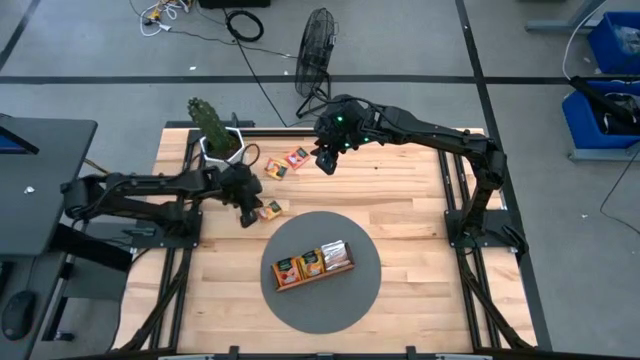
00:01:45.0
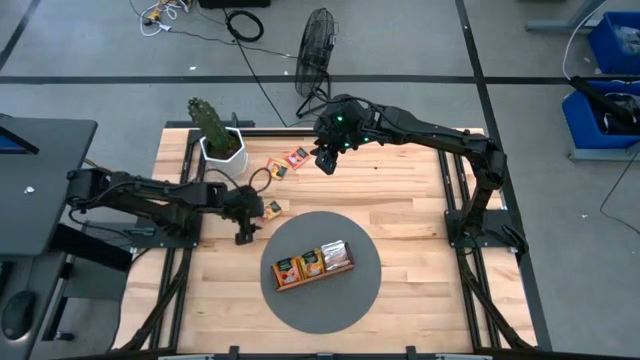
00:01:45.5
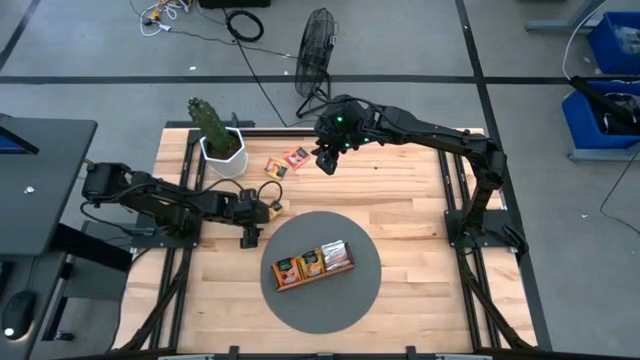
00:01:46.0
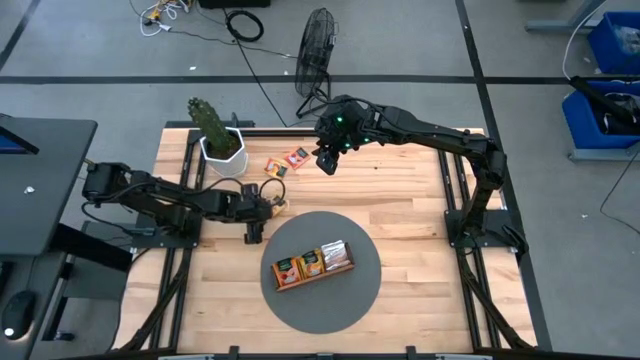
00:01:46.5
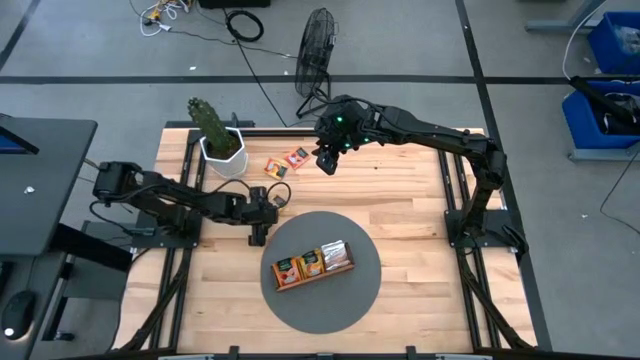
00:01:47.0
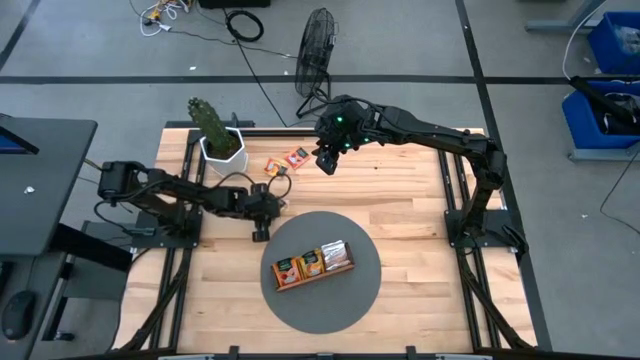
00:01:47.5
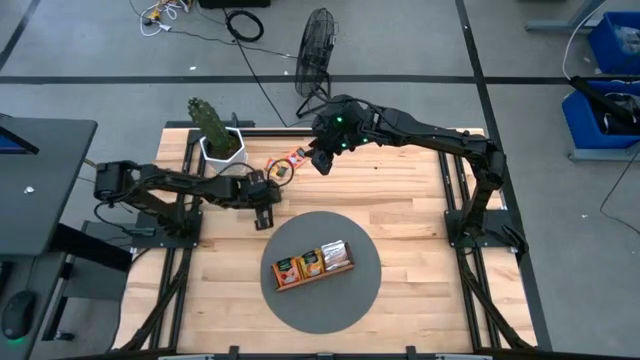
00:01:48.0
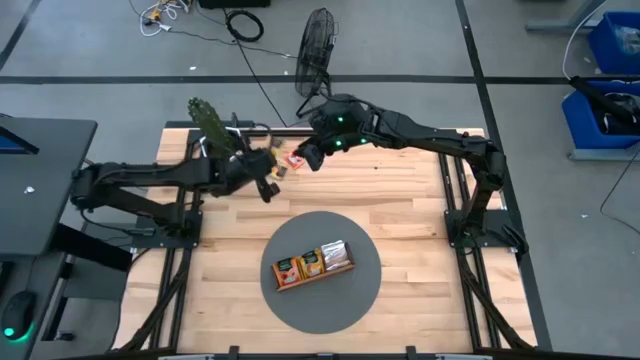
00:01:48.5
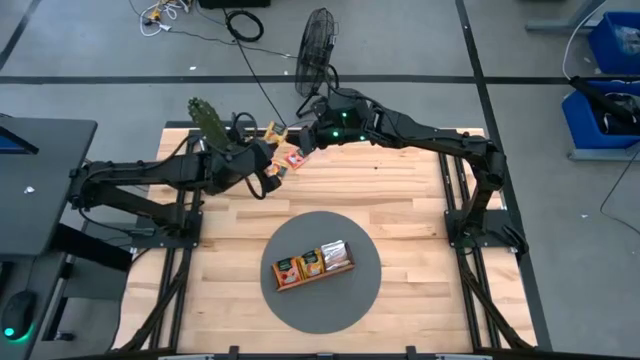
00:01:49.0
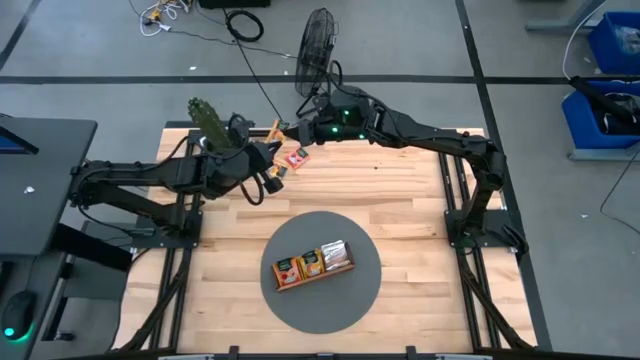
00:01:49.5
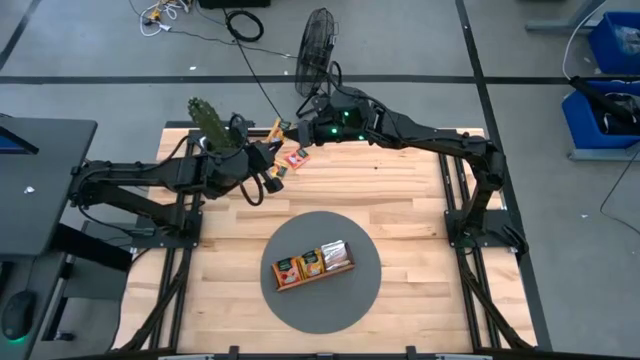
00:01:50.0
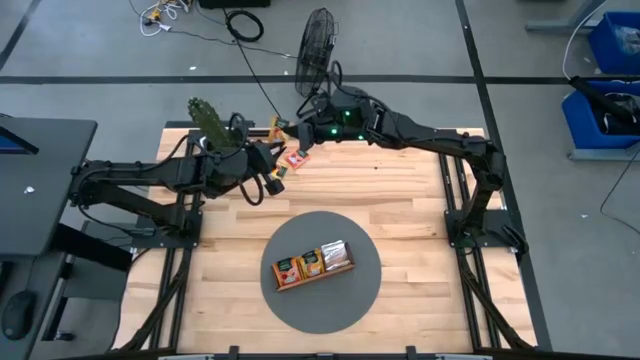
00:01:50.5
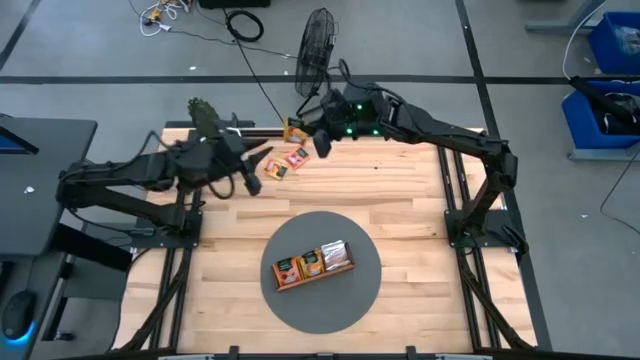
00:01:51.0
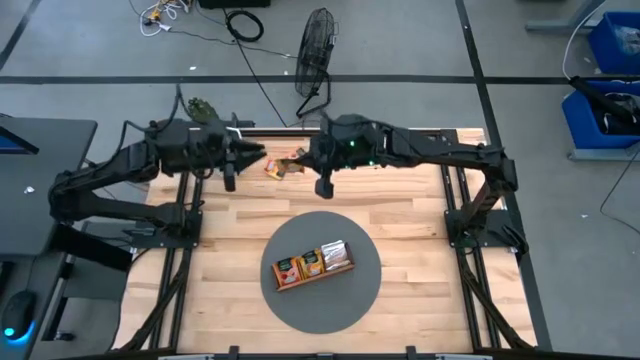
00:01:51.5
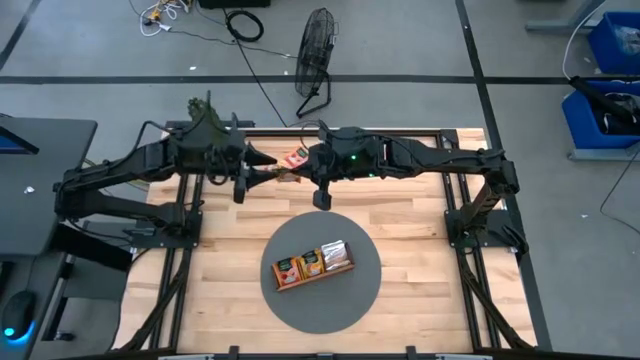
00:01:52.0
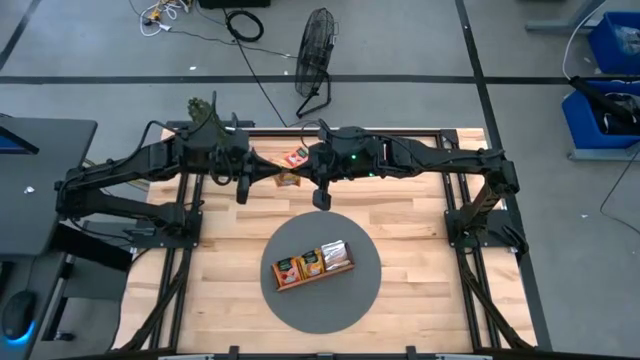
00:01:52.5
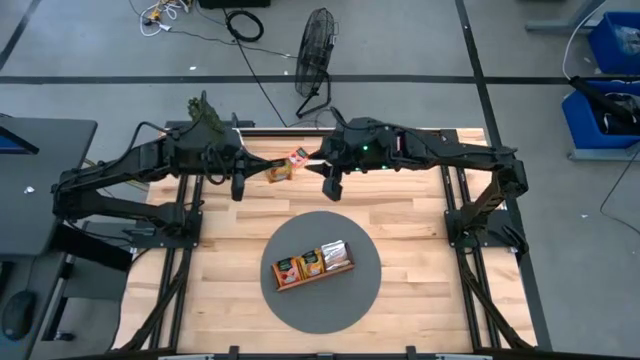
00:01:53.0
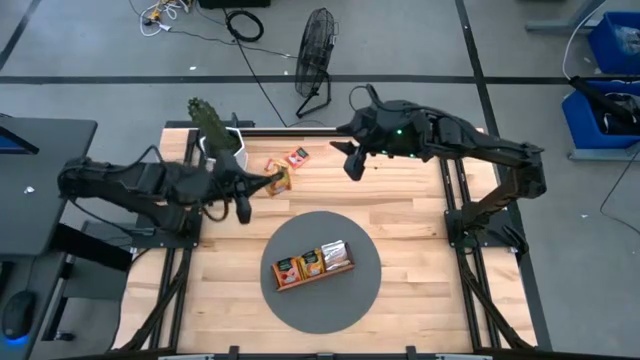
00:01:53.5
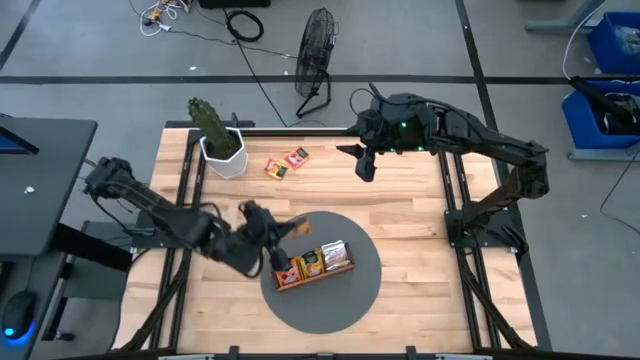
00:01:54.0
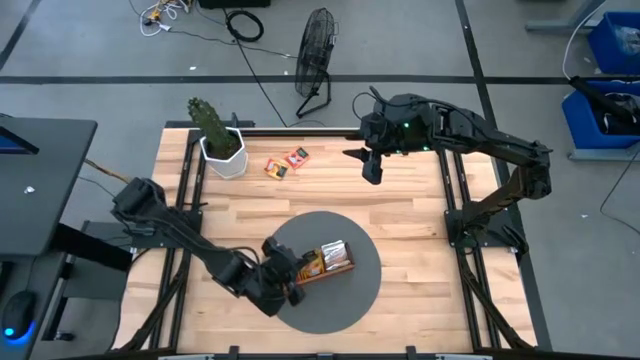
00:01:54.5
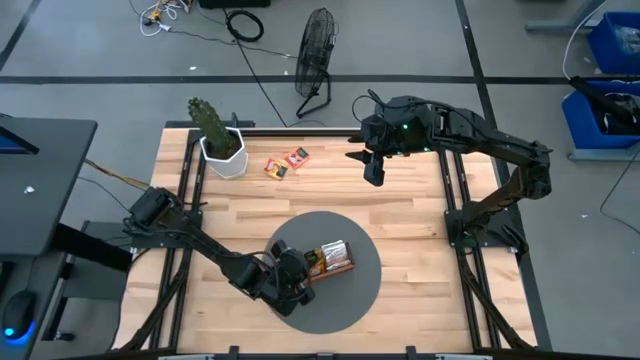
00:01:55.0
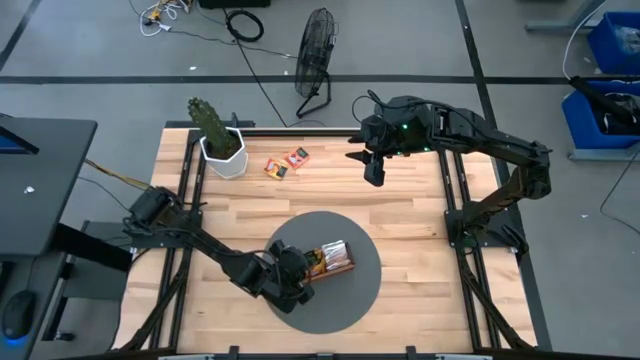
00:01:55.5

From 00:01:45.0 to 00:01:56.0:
Task: Pick & Place Tea
Put the bottom yellow tea bag into the middle section of the wooden organizer

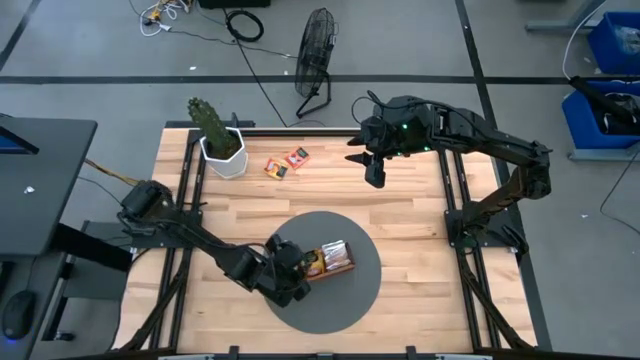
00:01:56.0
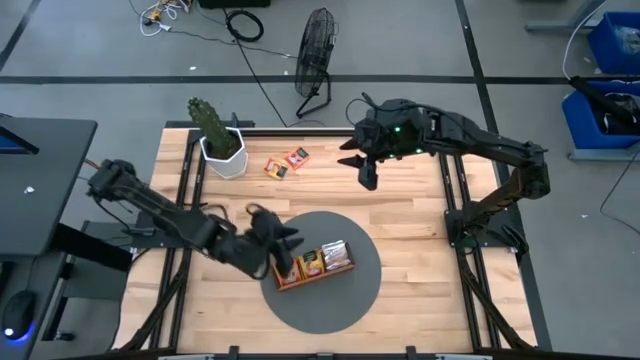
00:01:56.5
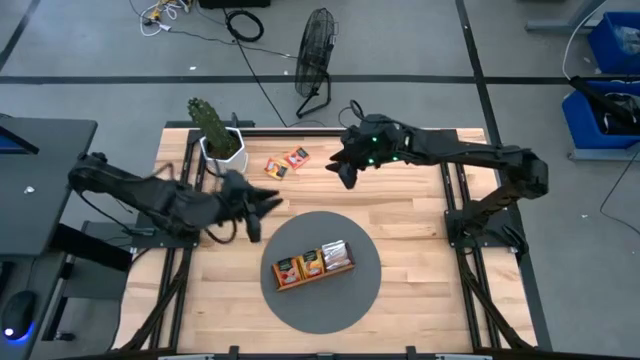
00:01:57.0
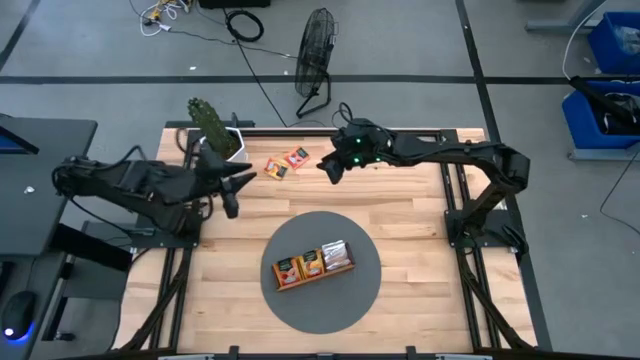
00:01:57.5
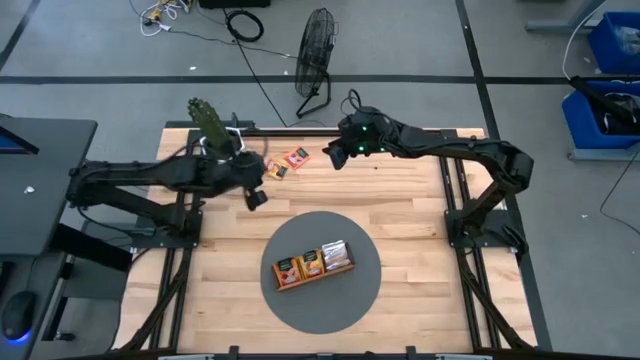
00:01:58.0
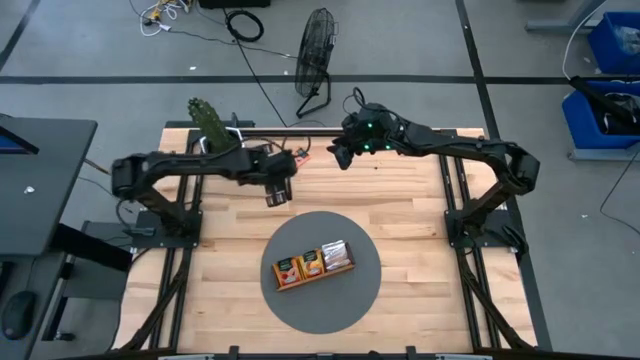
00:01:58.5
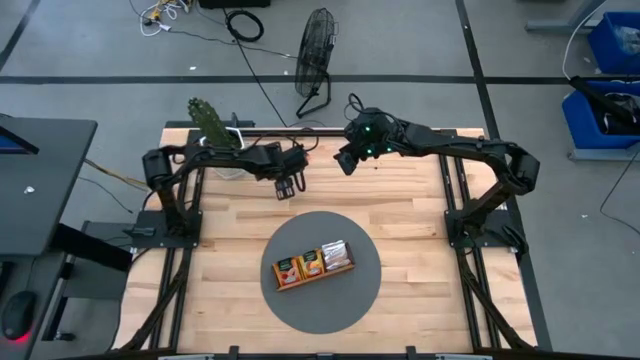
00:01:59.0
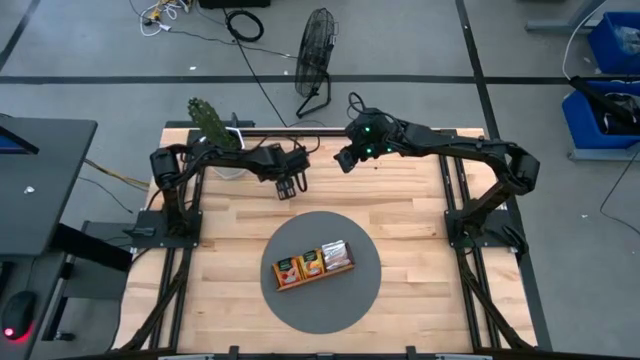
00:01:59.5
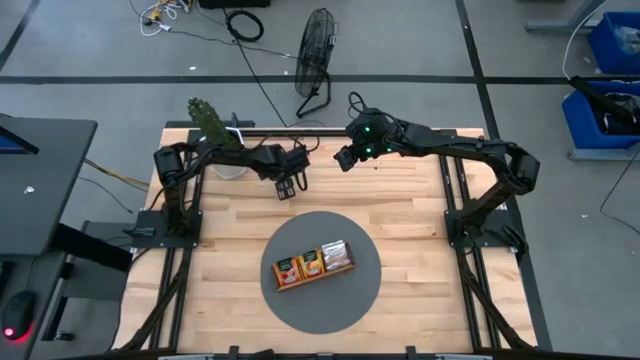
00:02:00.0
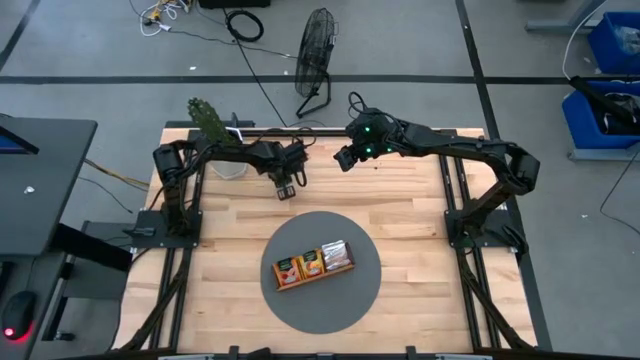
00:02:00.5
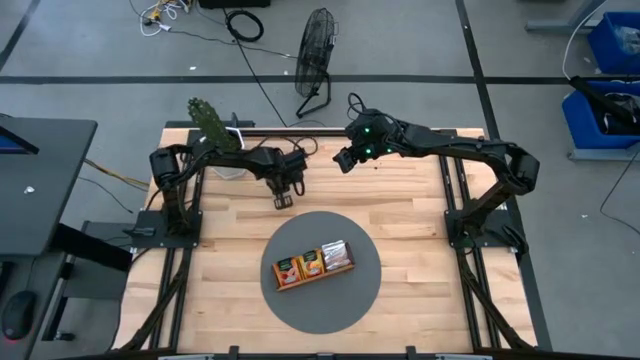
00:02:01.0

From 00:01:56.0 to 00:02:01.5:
Put the yellow tea bag into the middle section of the wooden organizer

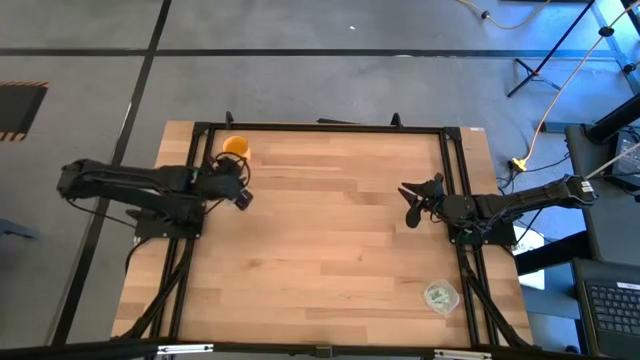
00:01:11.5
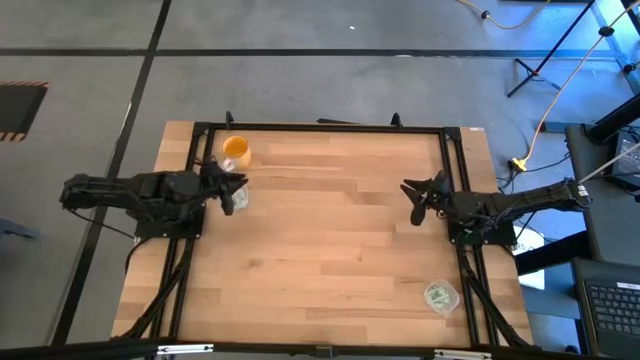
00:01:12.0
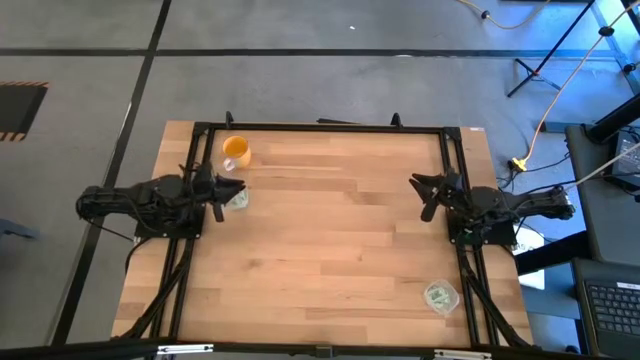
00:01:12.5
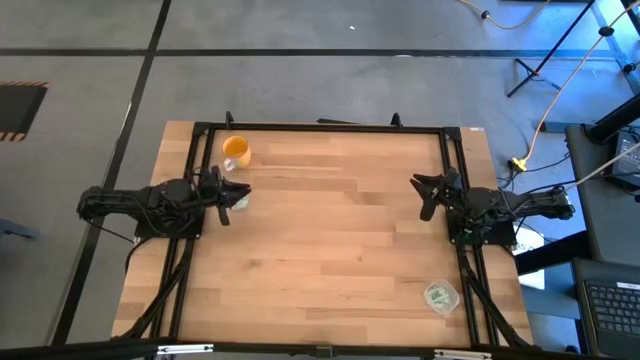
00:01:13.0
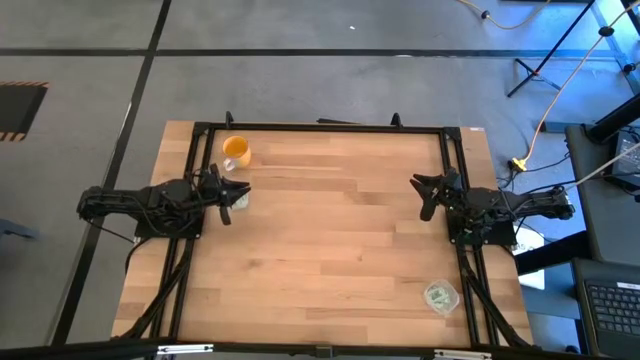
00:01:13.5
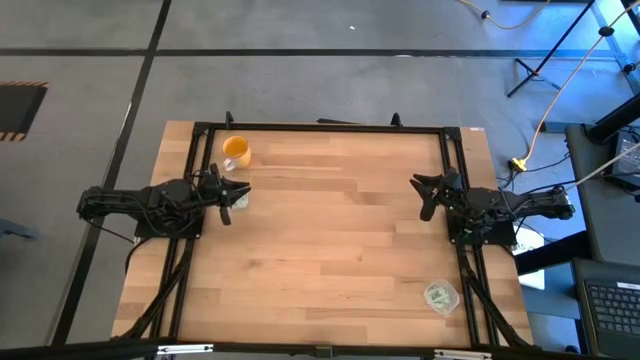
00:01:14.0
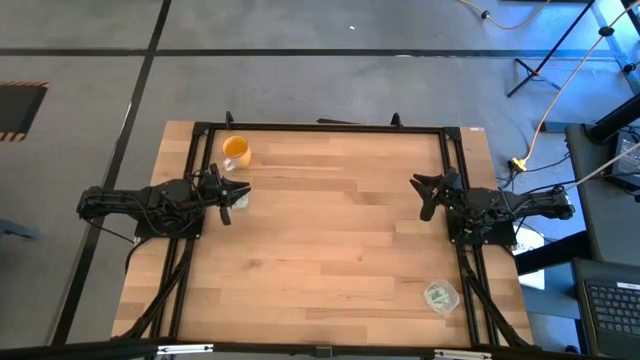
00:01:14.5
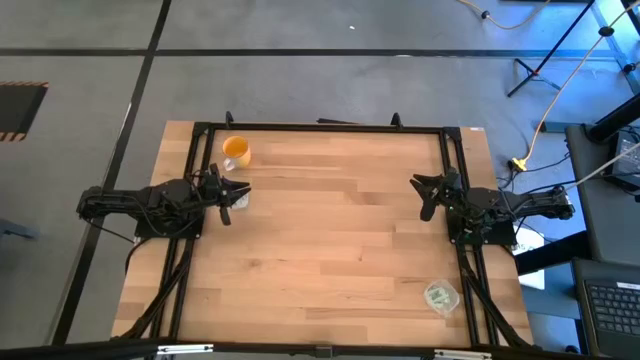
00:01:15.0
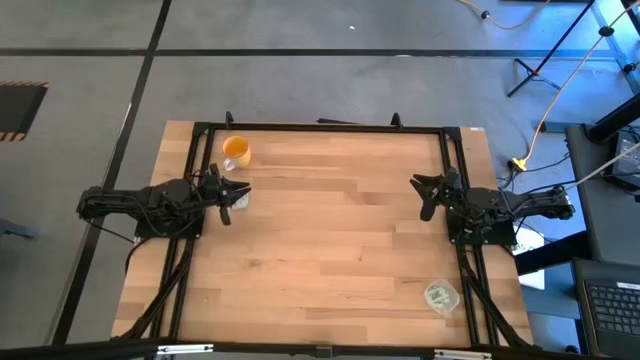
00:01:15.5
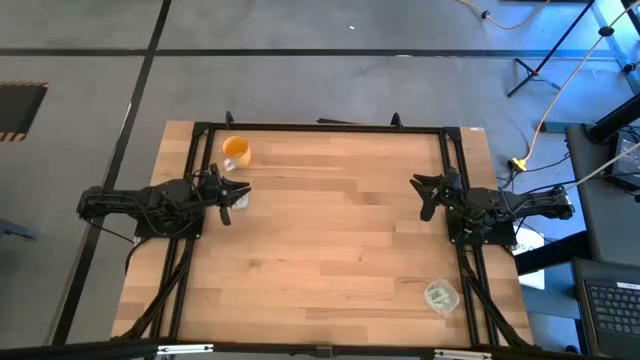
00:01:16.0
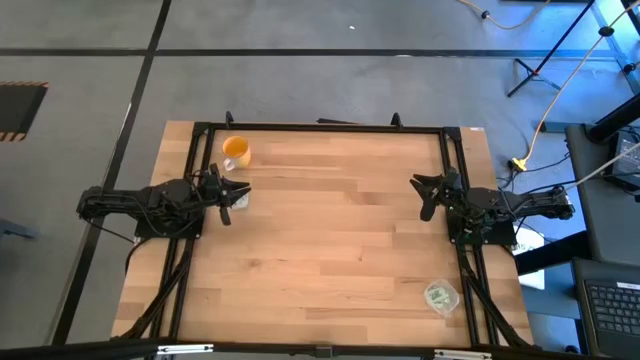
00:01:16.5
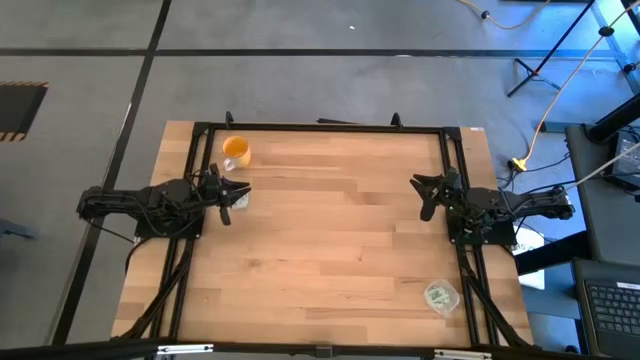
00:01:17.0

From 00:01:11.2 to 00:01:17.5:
Task: Pick and place items into bin
Return to Home Position
